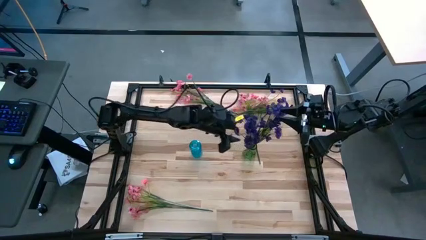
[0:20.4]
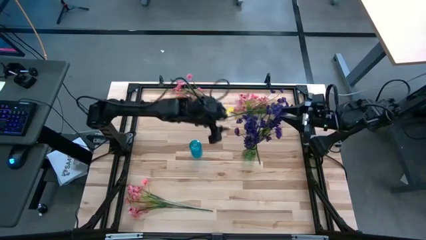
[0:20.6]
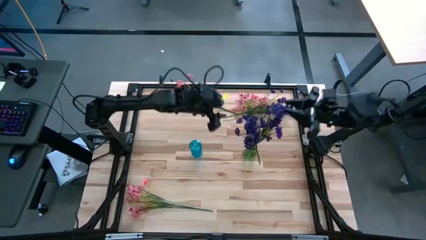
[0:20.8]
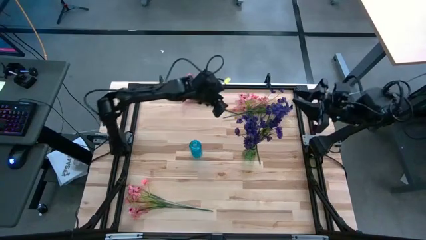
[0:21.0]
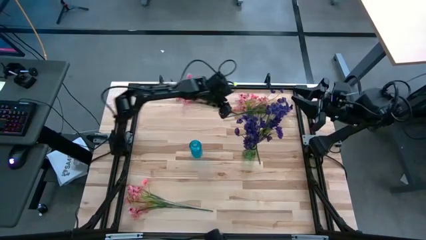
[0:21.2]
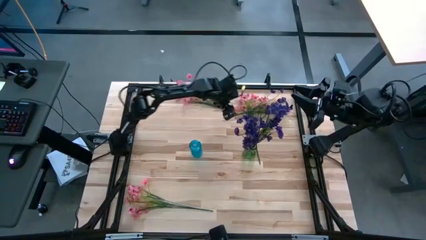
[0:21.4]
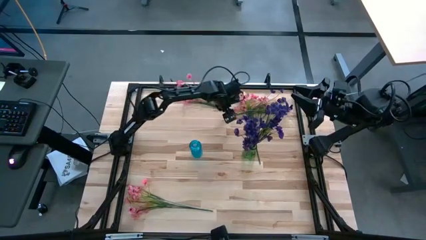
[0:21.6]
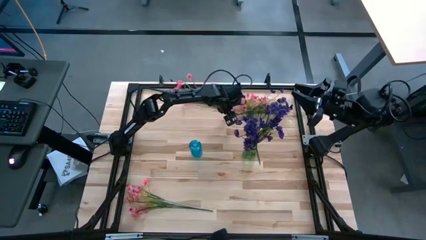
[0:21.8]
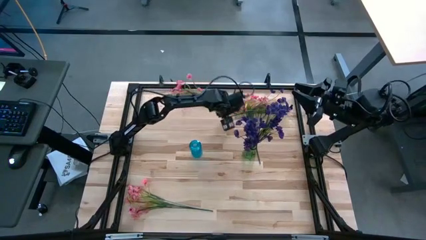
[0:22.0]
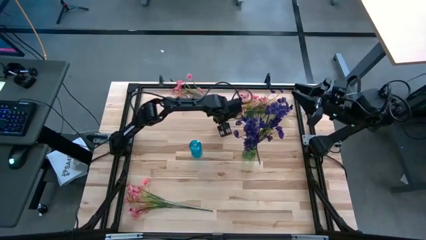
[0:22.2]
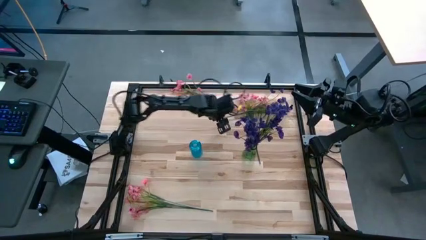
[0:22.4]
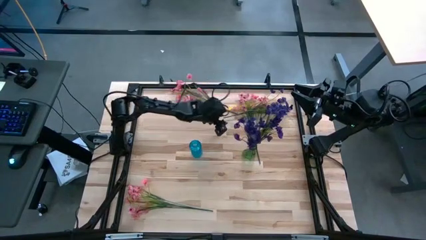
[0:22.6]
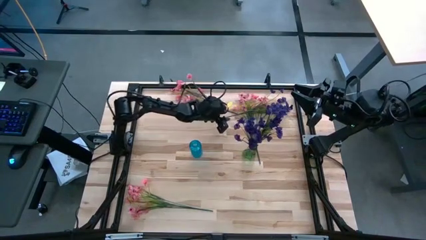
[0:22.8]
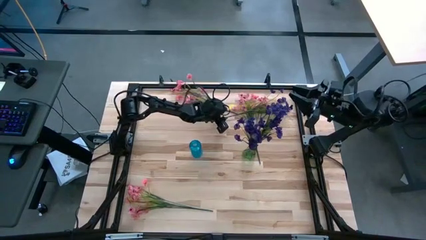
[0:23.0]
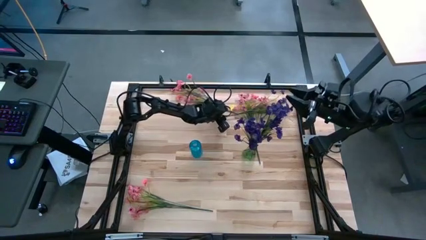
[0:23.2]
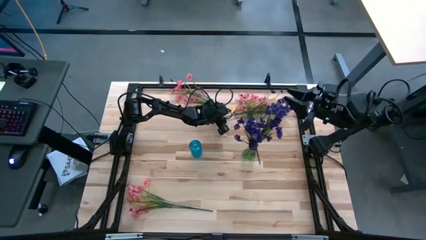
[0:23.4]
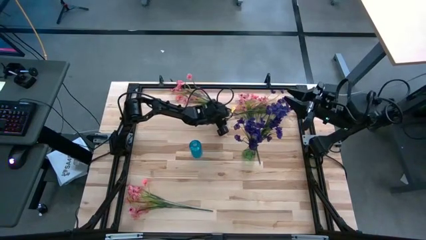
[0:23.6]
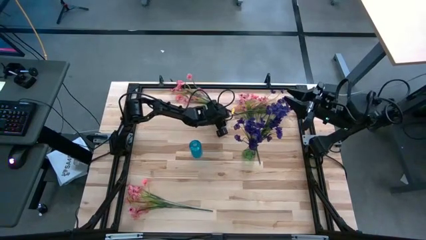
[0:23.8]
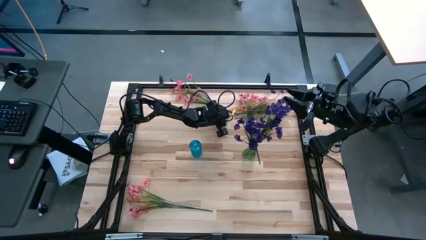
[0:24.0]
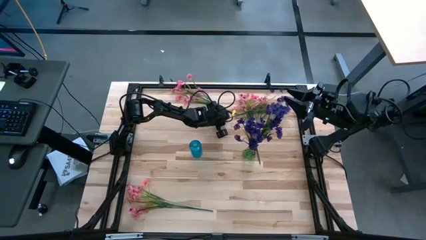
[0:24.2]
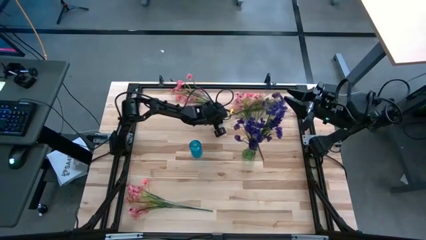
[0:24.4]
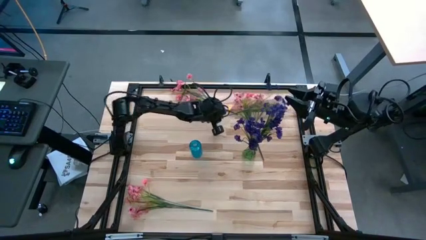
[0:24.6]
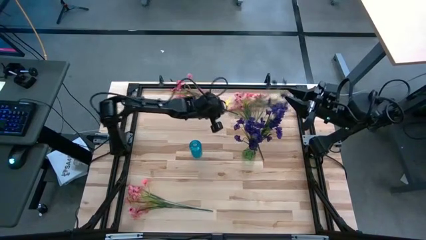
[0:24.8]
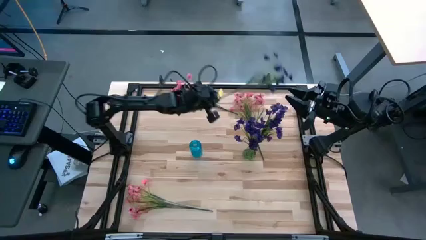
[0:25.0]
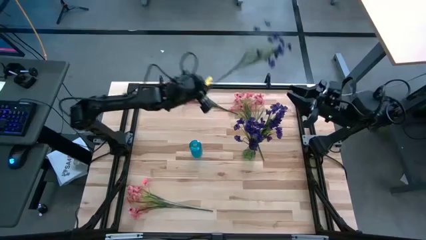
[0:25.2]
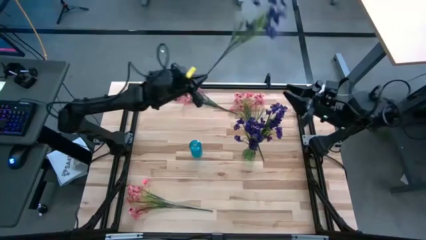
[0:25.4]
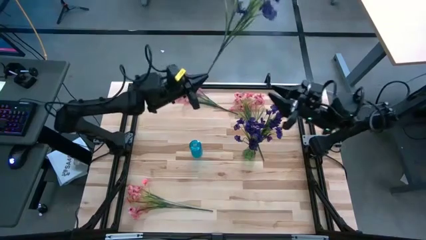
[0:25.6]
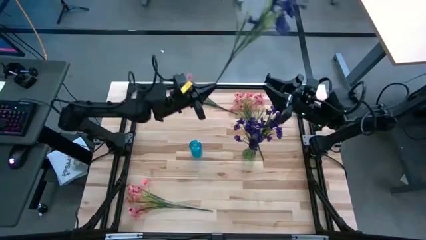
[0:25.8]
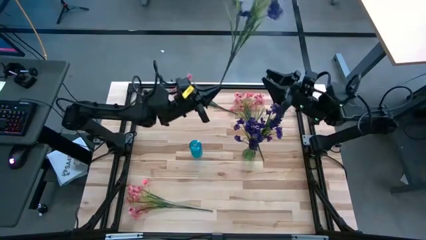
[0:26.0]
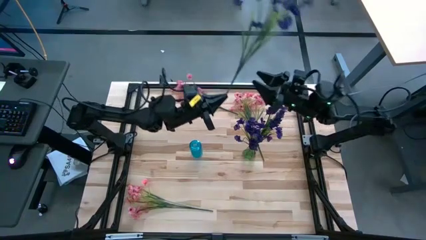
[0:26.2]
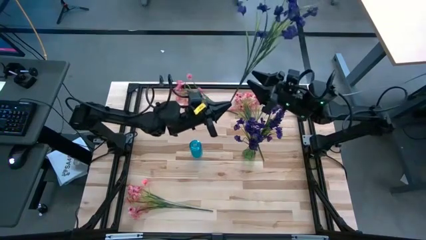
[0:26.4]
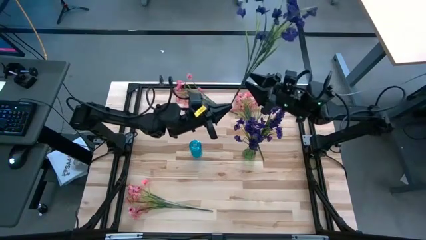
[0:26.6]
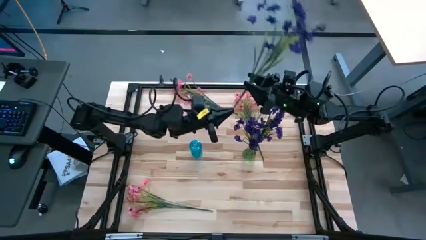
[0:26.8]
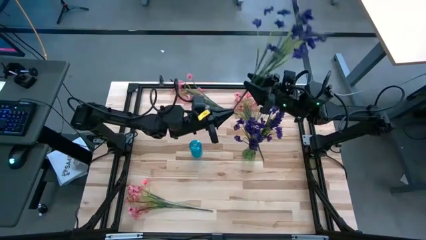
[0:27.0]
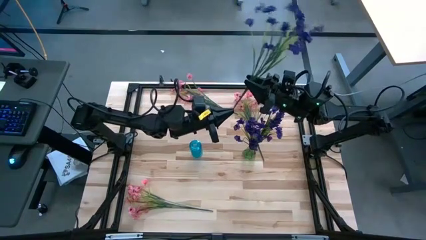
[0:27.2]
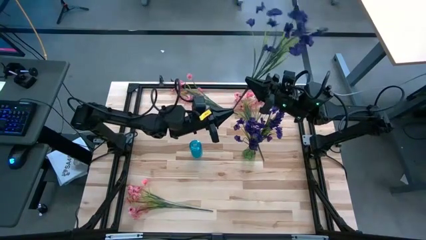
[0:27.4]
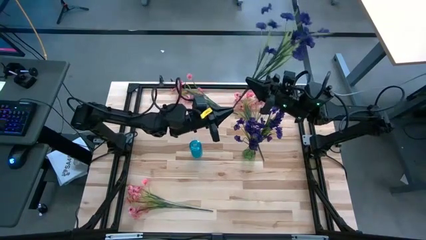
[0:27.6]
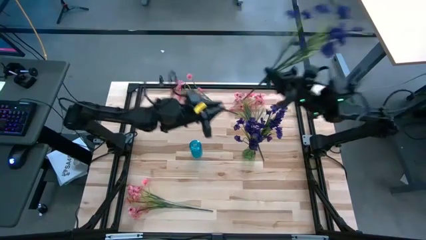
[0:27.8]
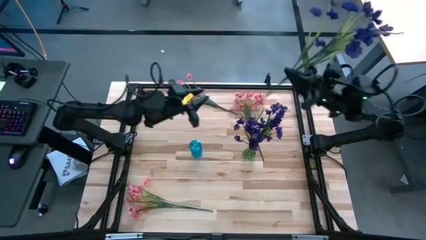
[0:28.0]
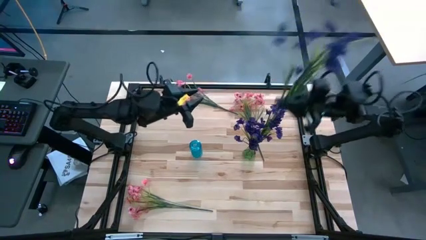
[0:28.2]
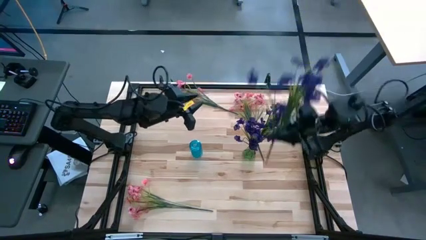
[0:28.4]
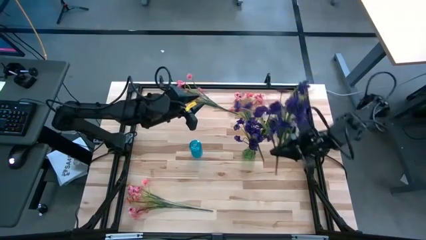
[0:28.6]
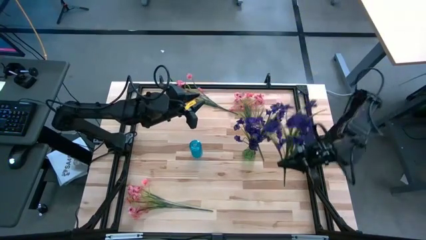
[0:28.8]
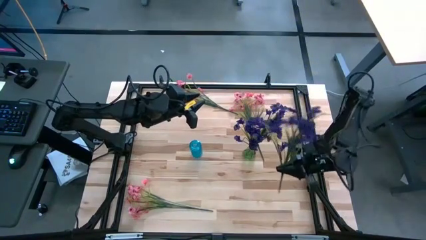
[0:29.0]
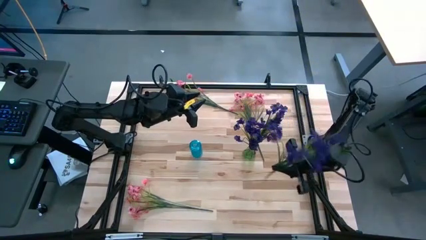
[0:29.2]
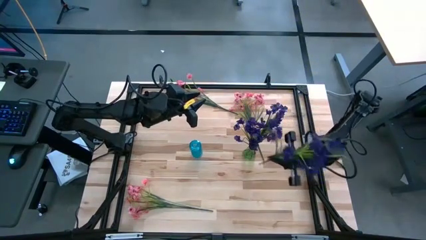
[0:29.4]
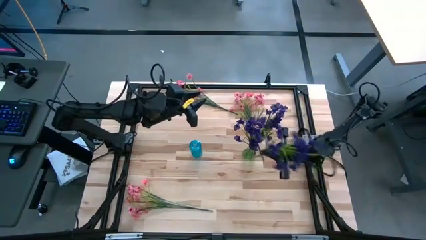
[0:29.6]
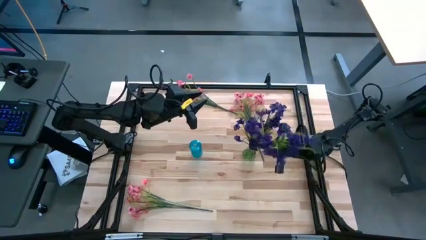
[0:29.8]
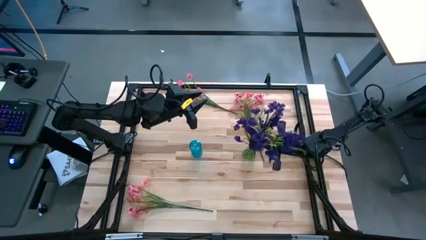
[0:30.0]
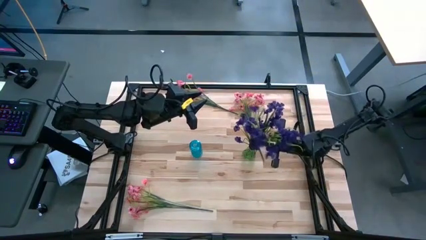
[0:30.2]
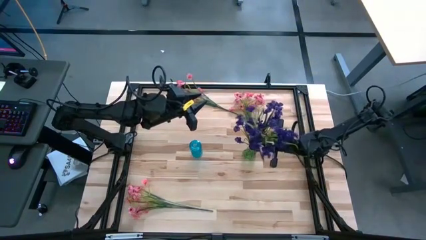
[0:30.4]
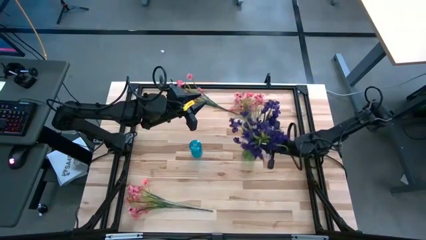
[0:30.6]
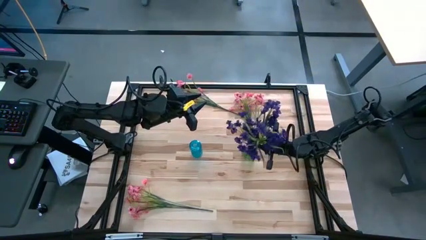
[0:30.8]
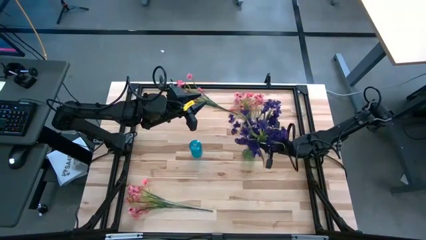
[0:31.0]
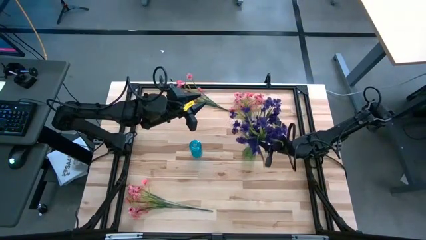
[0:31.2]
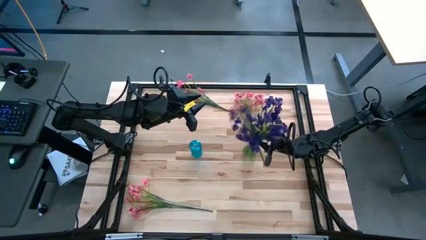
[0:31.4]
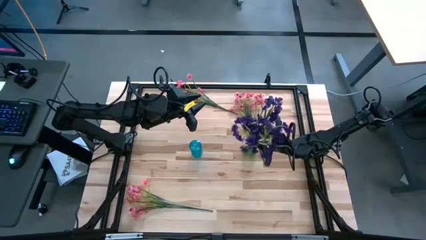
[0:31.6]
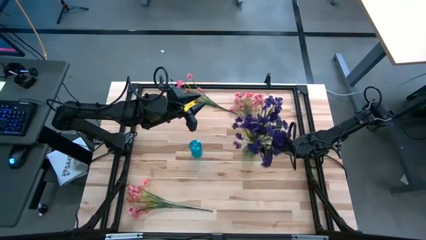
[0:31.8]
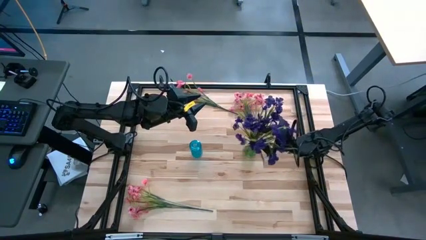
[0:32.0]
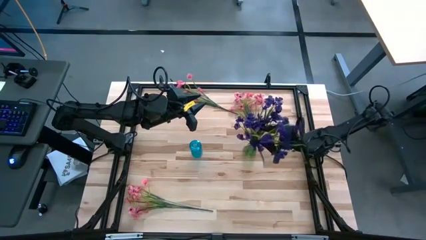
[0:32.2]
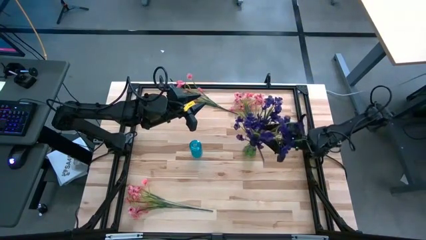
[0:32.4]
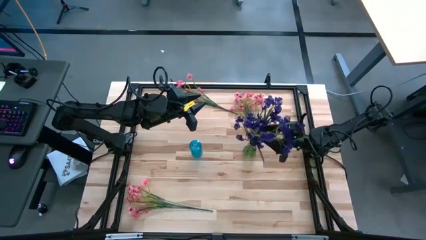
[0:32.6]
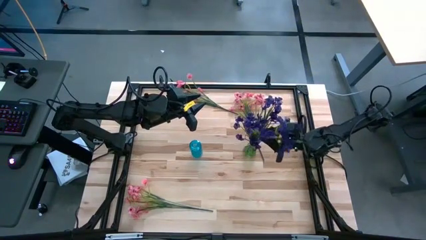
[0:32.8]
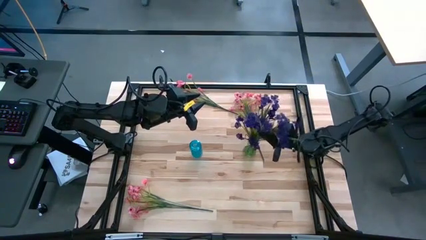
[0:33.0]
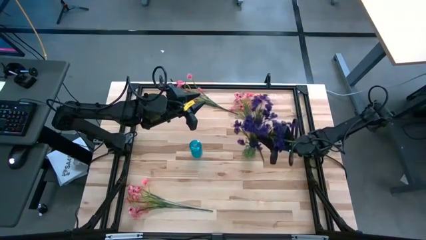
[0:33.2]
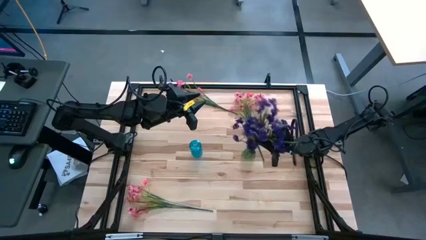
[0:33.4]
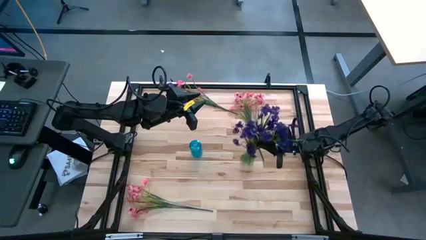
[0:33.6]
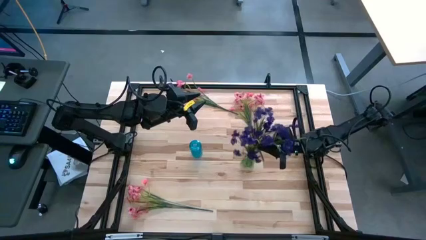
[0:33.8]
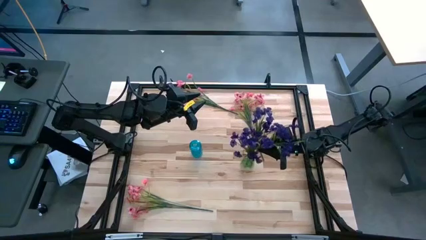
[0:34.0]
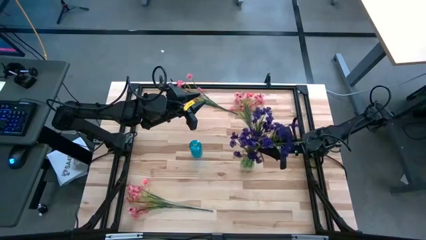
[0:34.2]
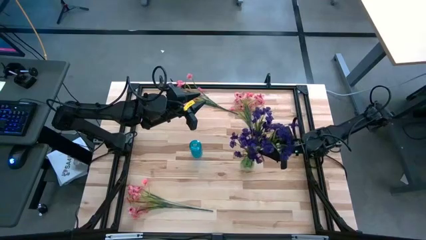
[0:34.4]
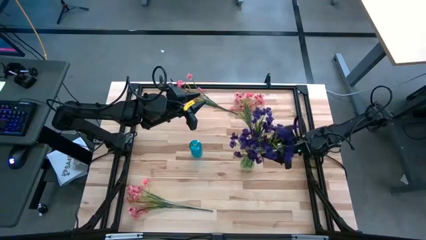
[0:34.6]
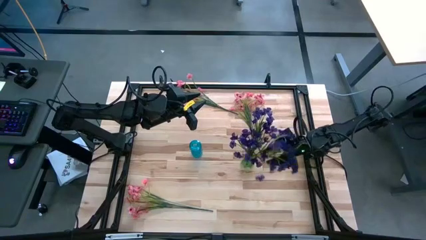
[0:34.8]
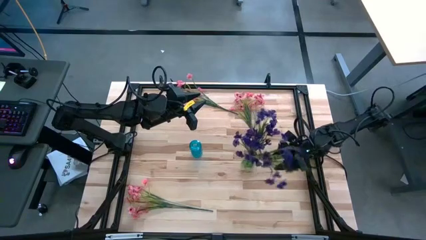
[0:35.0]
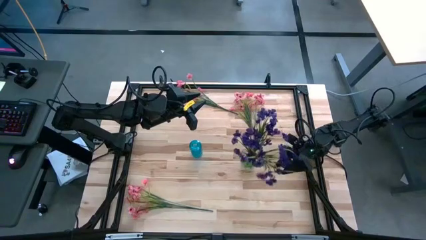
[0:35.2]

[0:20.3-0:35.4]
Task: Sort flowers into vase by color
Put the violet flowers into the green vase

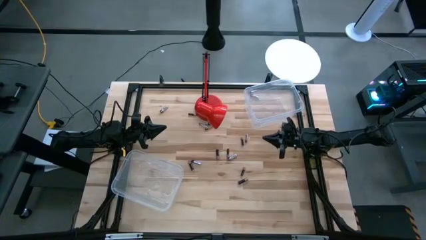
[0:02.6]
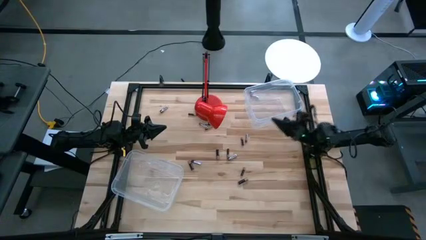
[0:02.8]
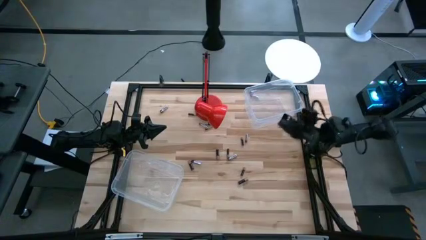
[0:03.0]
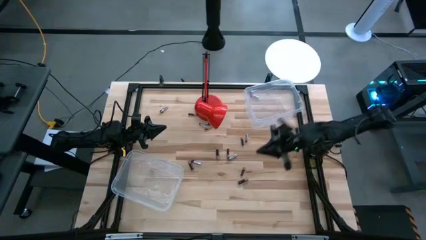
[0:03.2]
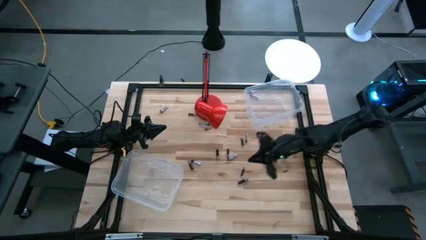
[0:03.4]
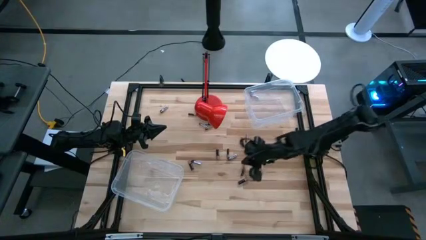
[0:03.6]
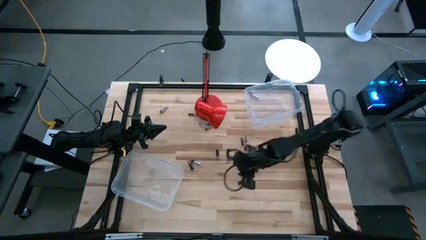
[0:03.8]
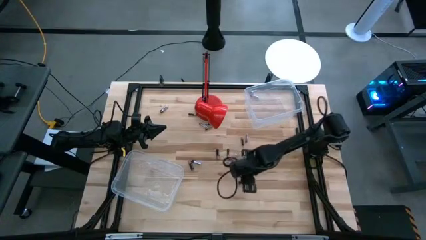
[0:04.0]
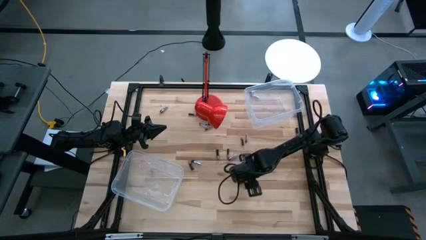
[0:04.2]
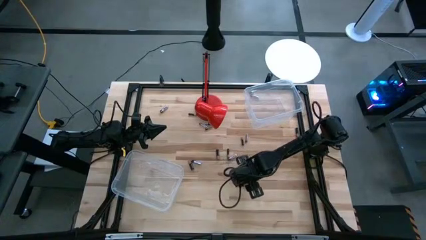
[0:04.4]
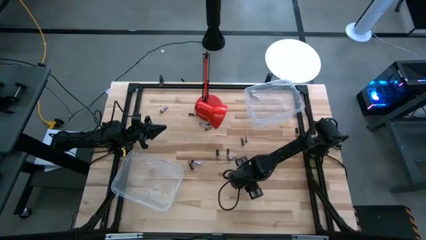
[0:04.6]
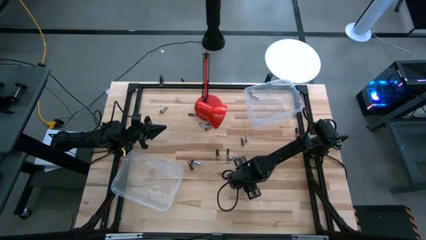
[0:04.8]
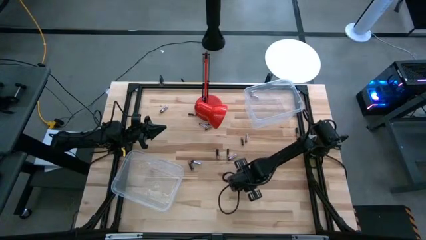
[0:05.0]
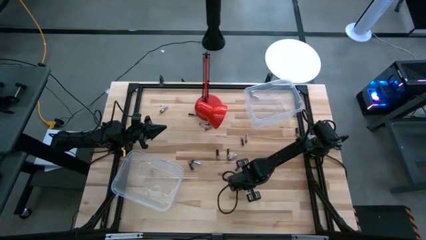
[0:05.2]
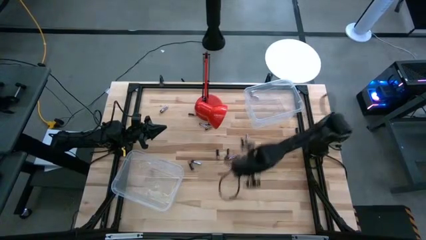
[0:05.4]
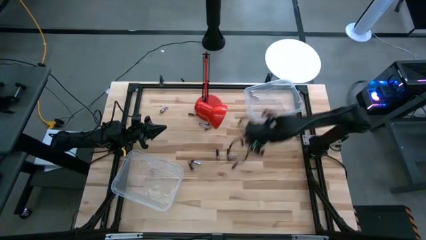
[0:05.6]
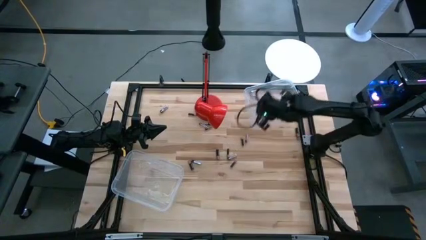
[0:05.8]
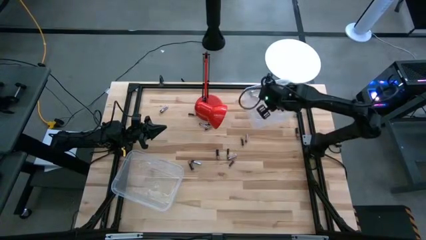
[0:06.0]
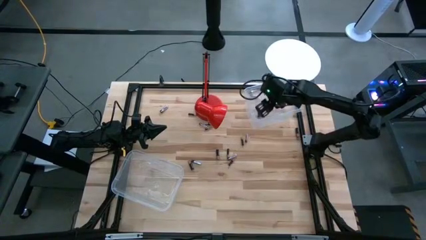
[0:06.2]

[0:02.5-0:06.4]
Task: Sort batteries
Put the black battery into the top transparent bin
